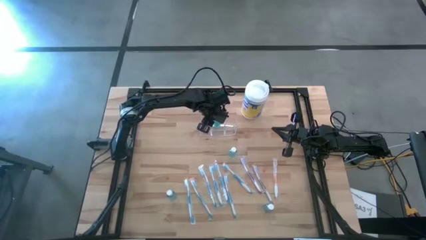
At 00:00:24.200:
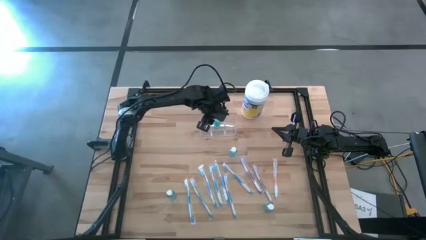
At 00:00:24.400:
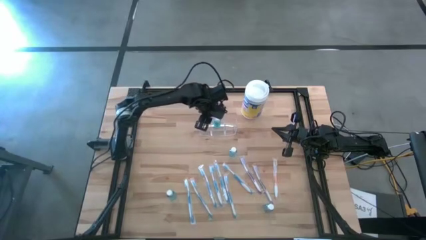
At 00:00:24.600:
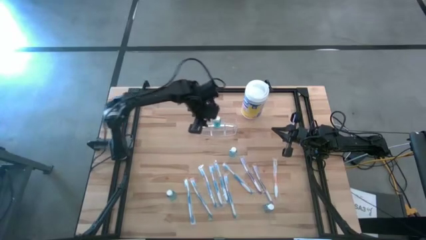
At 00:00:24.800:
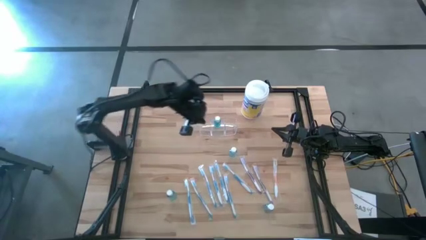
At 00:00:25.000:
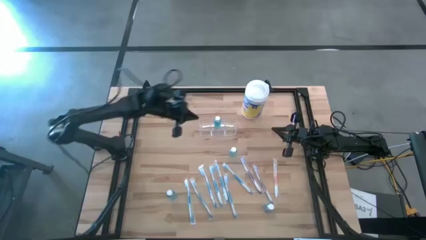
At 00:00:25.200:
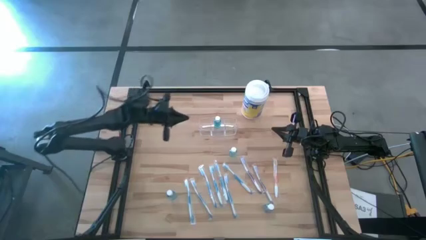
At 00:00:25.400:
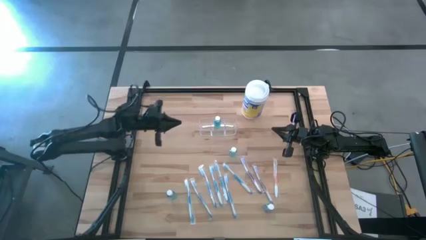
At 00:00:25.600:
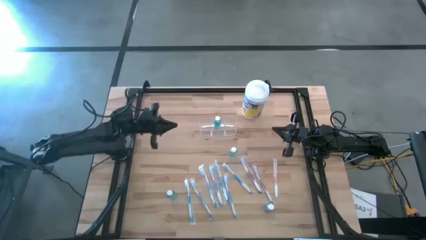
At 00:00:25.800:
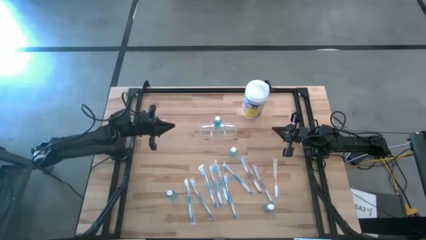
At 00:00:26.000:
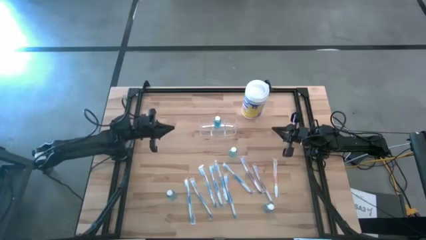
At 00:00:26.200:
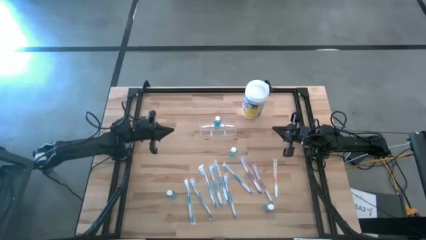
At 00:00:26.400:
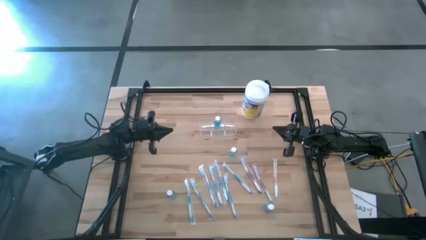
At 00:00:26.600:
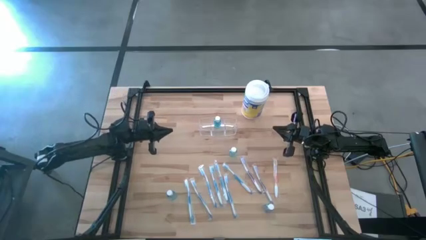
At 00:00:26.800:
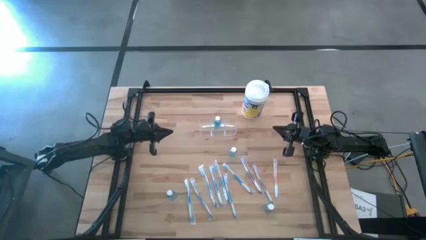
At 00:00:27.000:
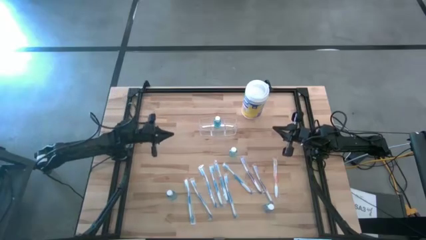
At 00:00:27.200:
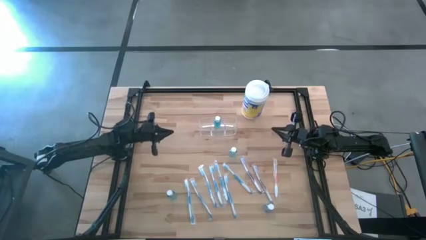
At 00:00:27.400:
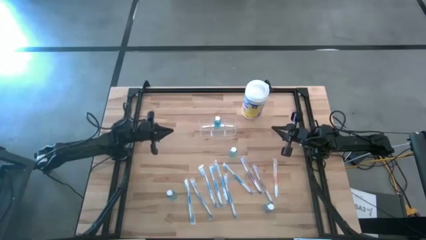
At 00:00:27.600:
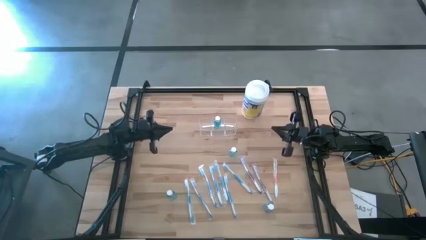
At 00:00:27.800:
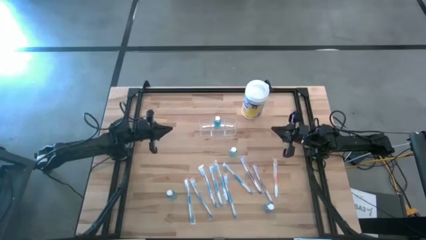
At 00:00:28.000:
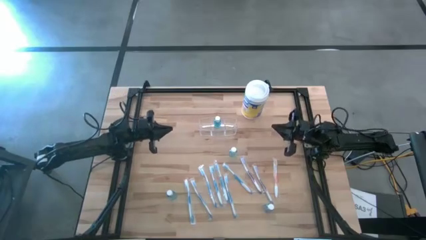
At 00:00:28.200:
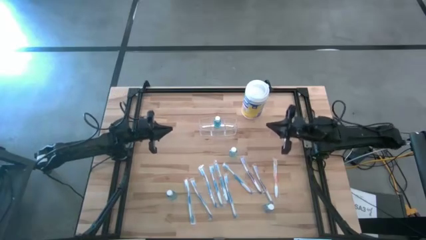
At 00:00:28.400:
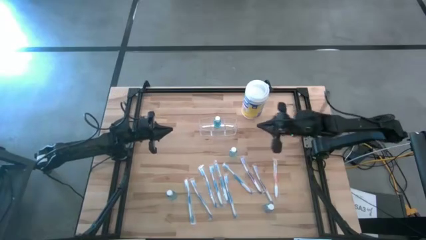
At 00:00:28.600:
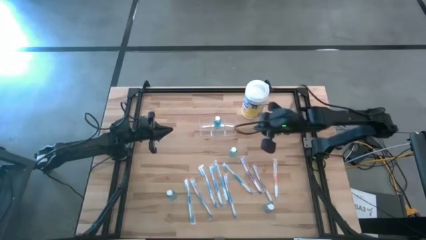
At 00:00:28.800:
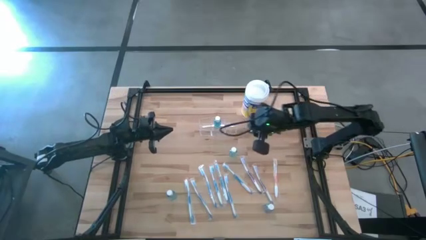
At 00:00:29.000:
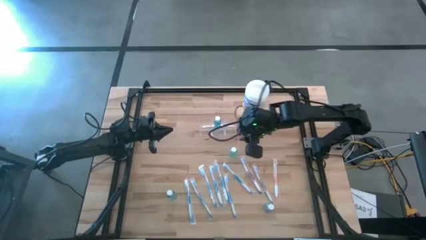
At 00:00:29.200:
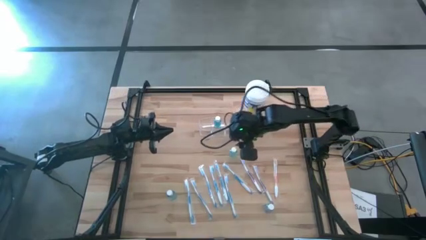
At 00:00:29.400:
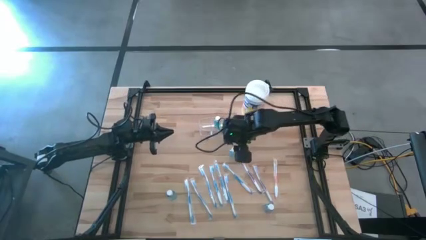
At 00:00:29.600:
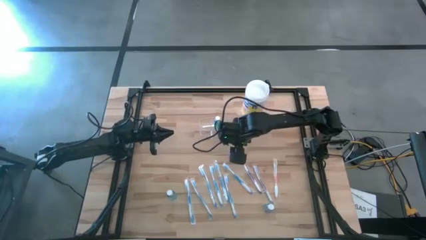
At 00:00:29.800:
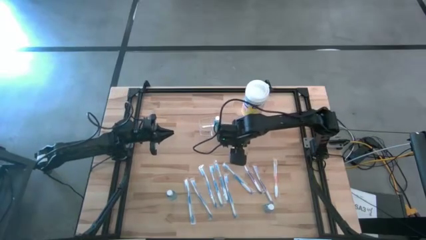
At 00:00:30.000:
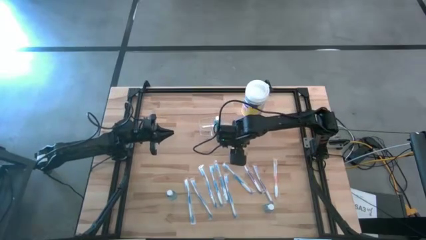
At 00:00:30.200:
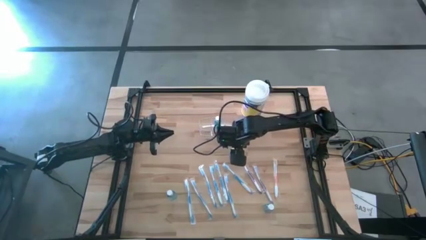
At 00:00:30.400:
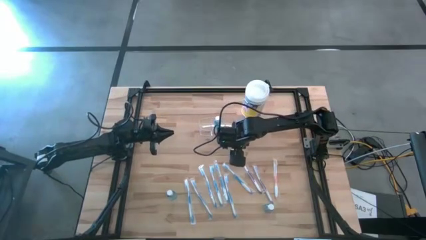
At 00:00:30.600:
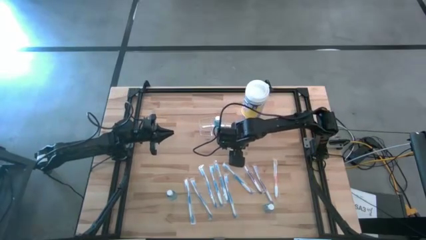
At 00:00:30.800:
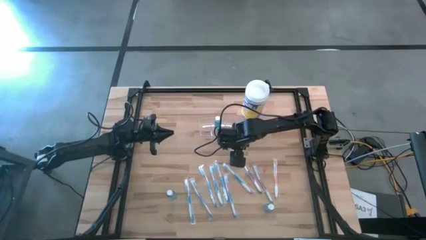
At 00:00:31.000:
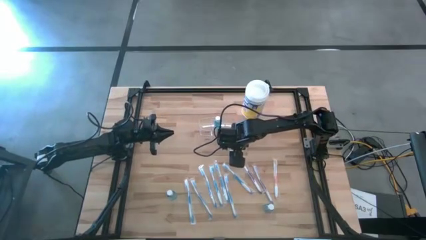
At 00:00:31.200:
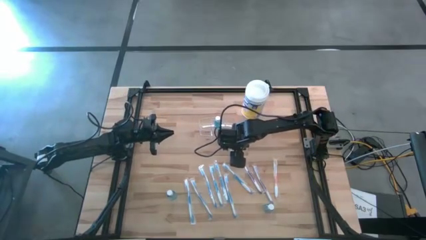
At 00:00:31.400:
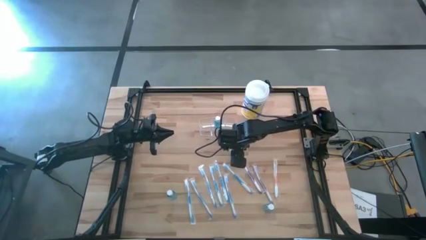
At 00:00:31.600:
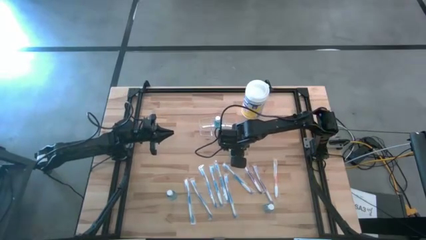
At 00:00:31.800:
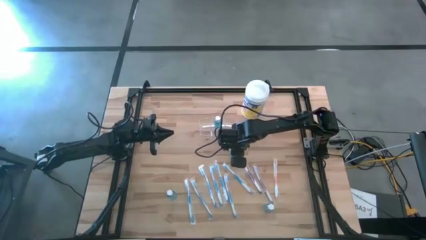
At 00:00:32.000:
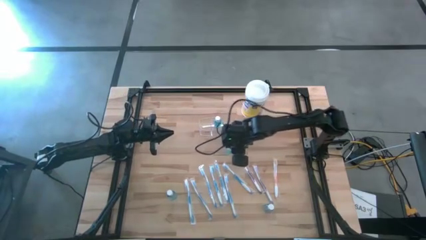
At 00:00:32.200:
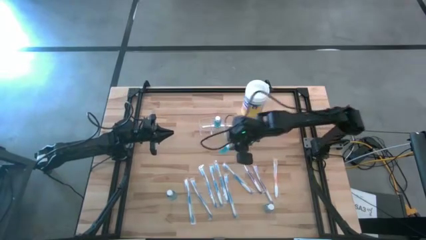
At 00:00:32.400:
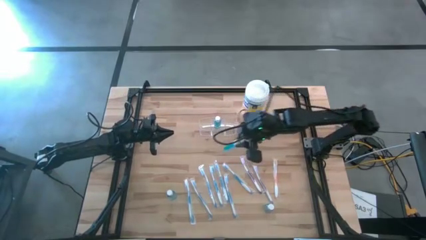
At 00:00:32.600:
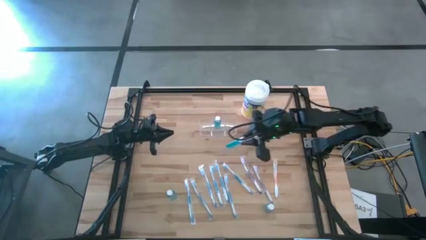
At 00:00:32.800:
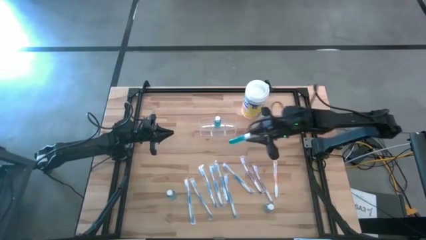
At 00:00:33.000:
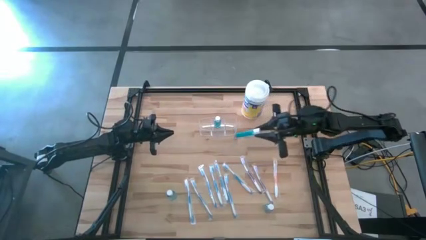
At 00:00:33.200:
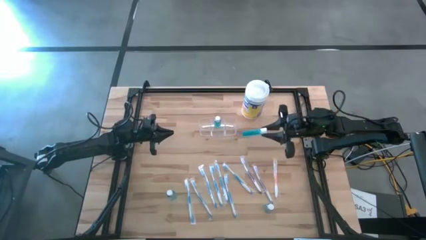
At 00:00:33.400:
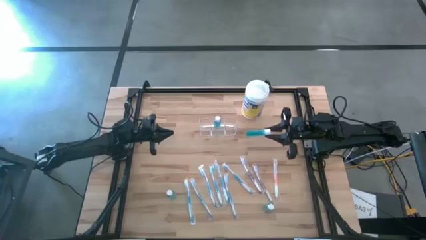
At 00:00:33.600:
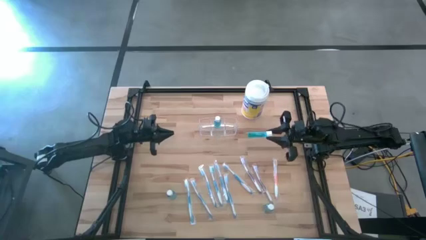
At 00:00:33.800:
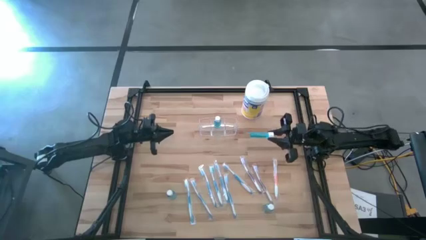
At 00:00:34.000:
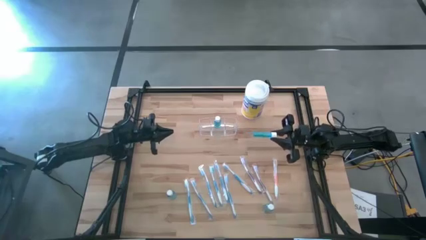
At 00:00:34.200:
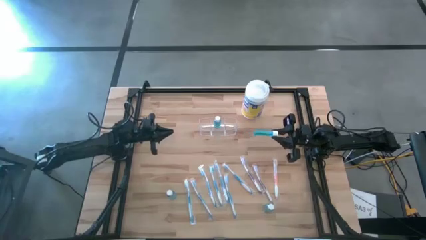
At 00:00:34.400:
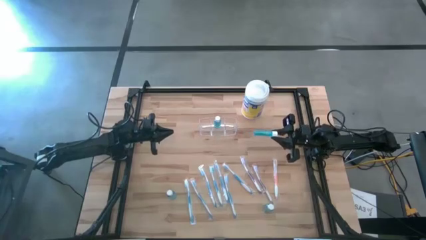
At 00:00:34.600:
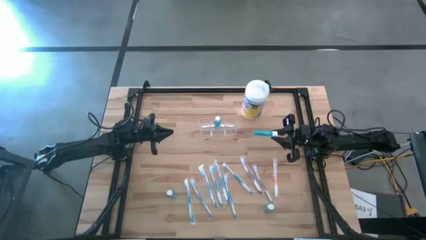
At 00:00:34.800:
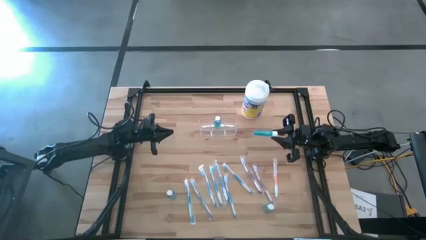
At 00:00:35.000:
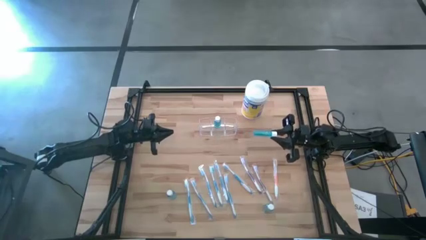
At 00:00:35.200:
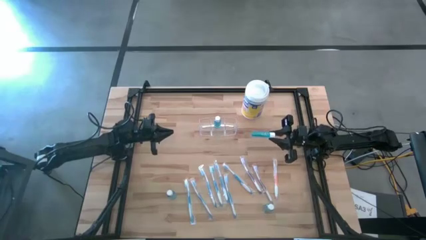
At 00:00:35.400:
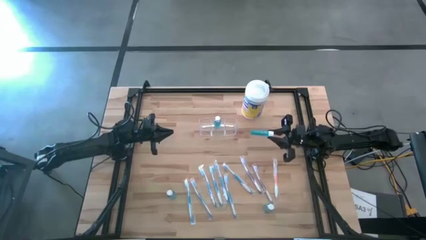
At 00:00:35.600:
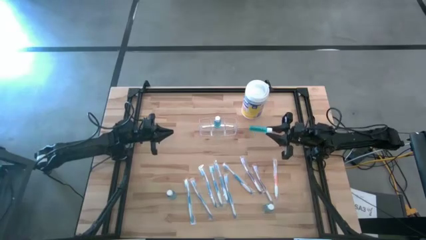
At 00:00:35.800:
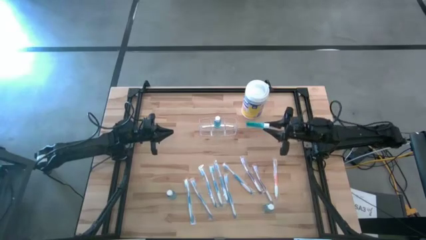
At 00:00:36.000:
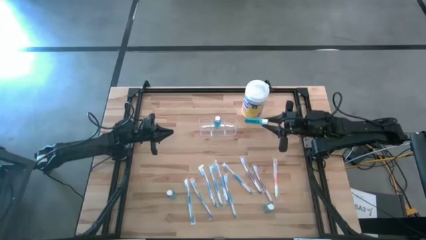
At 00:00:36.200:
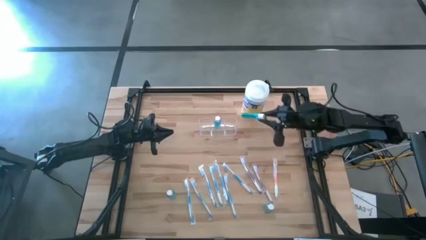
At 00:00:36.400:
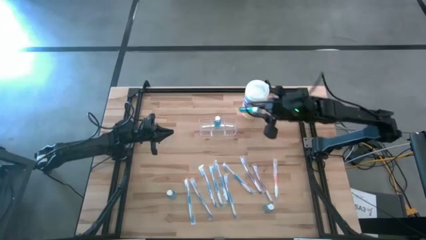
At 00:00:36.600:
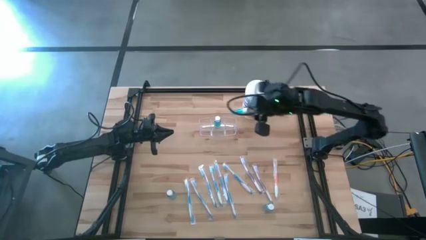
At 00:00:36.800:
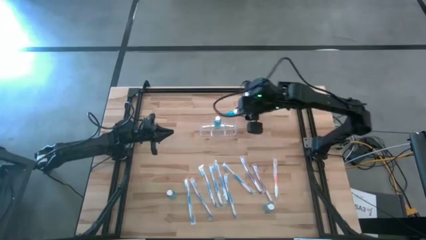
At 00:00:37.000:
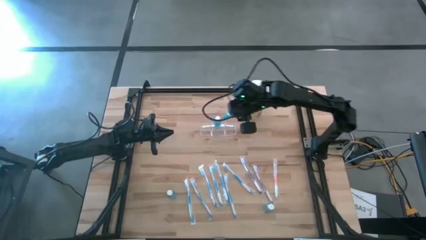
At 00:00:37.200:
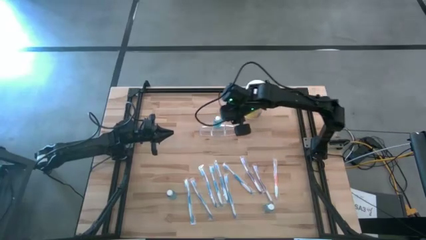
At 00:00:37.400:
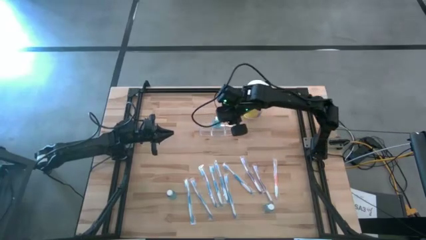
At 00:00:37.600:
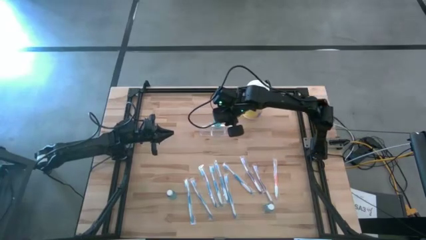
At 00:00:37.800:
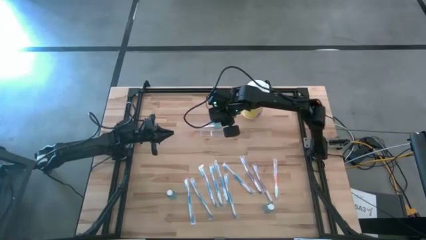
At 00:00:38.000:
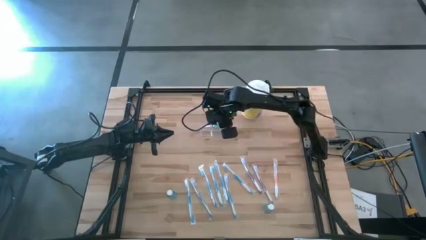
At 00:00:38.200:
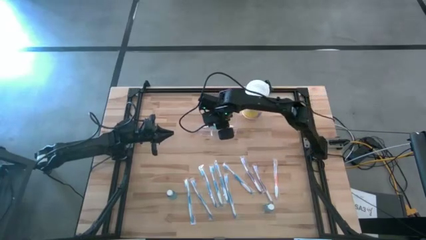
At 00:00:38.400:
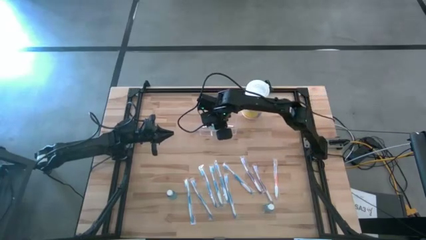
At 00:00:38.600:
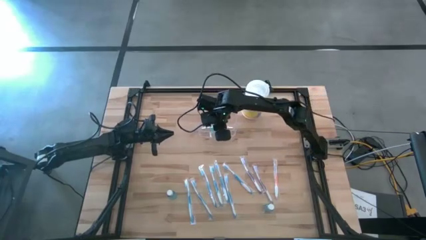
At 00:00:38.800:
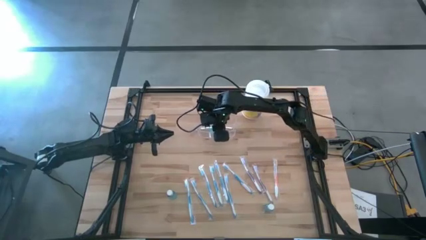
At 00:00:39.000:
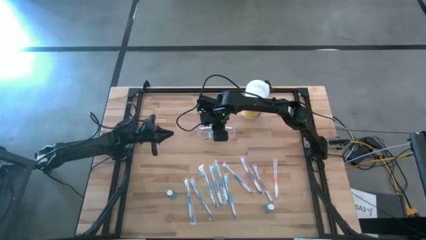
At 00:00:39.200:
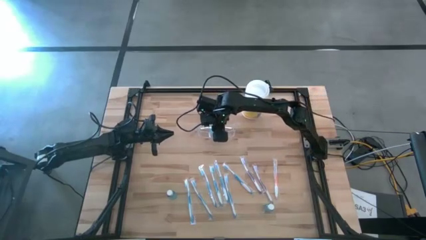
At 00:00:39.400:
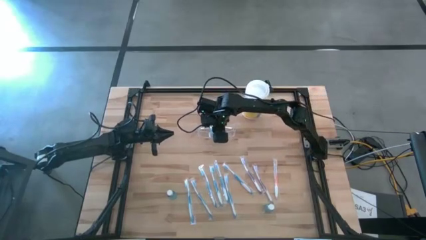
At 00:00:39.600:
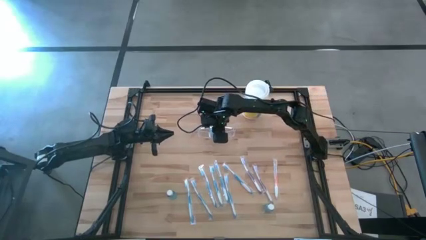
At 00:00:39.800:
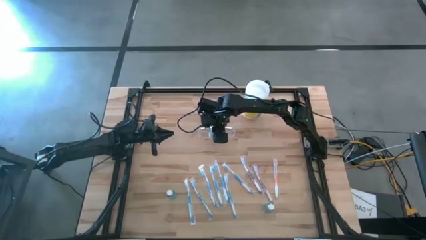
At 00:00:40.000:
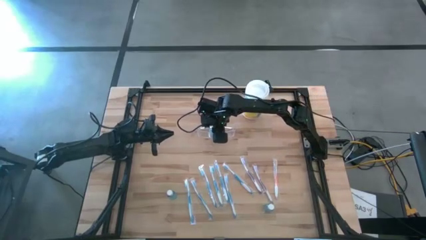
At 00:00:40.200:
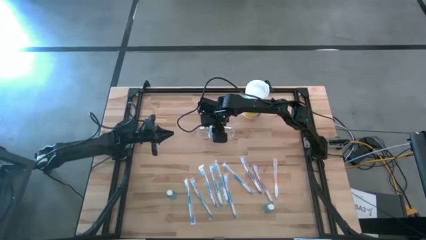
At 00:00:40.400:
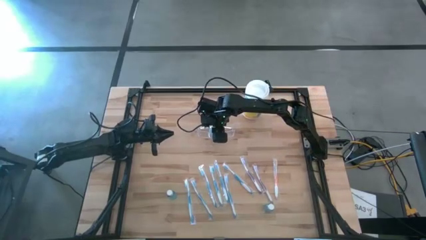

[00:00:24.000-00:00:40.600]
Task: Pick & Place toothbrushing station
Put the blue mouthwash bottle into the transparent organizer
